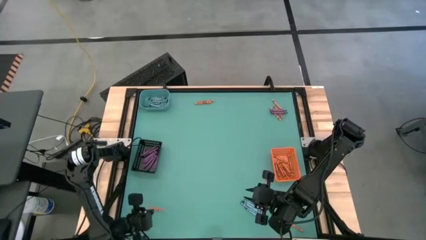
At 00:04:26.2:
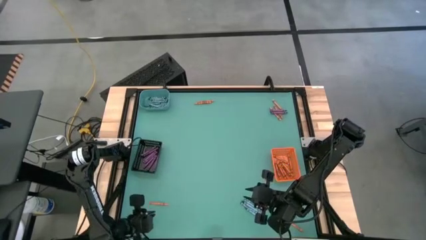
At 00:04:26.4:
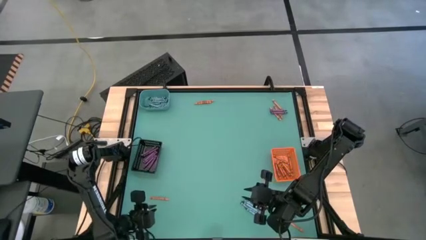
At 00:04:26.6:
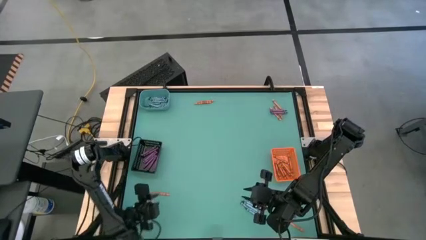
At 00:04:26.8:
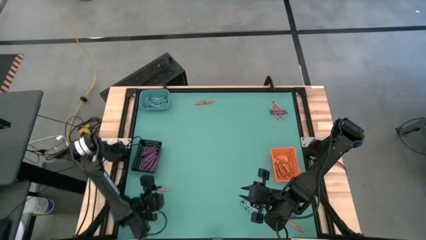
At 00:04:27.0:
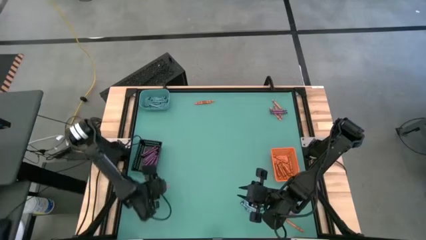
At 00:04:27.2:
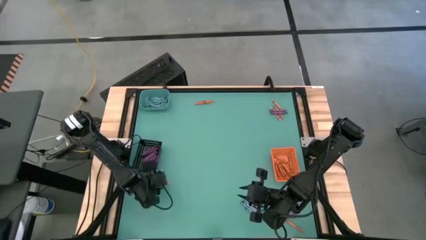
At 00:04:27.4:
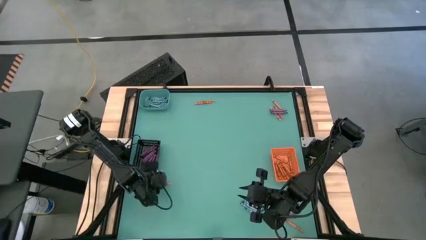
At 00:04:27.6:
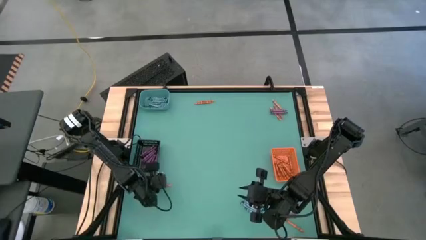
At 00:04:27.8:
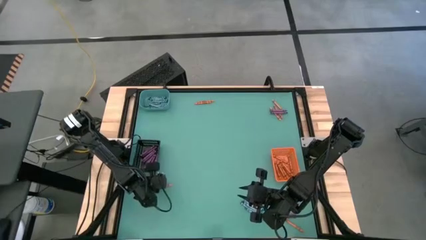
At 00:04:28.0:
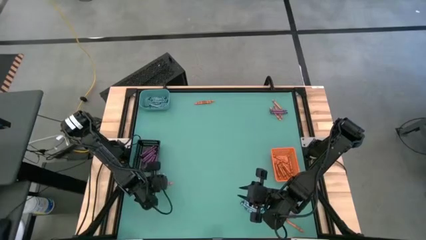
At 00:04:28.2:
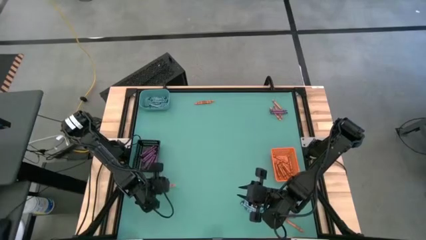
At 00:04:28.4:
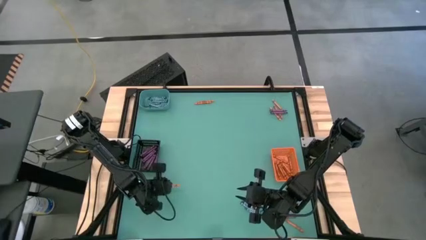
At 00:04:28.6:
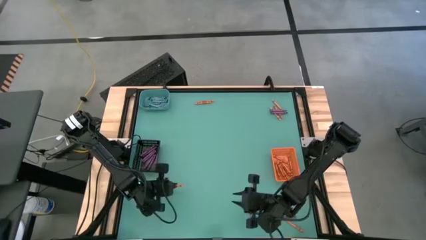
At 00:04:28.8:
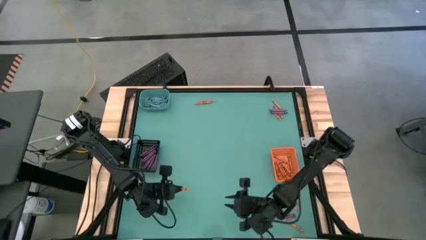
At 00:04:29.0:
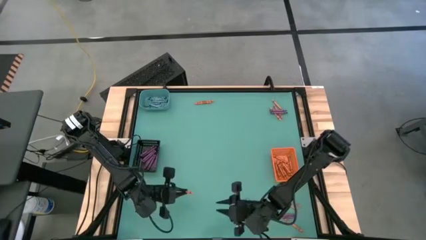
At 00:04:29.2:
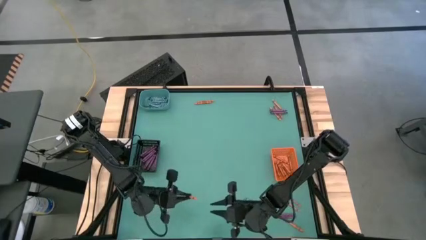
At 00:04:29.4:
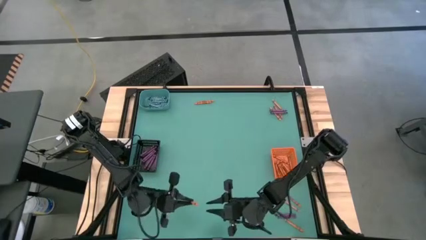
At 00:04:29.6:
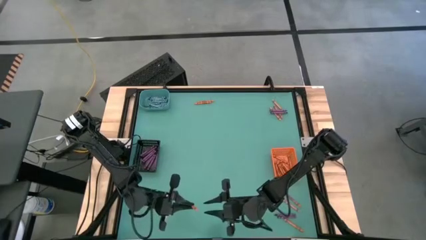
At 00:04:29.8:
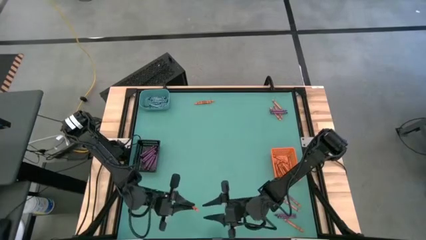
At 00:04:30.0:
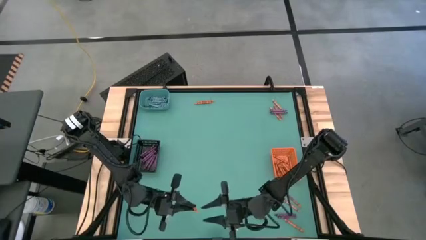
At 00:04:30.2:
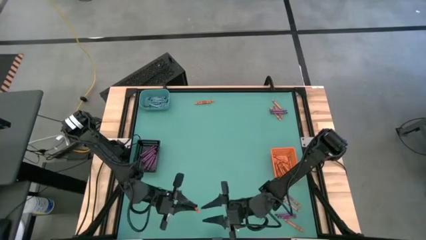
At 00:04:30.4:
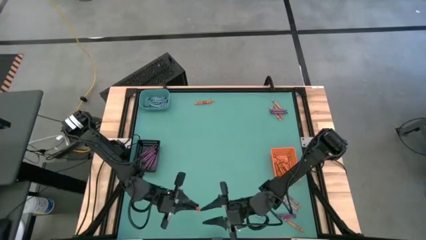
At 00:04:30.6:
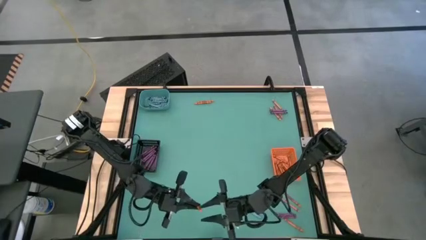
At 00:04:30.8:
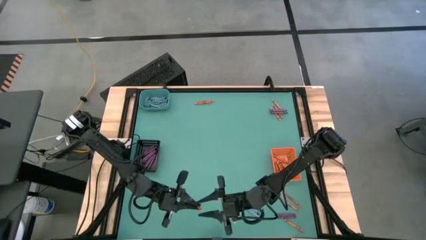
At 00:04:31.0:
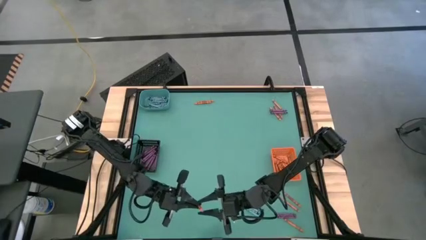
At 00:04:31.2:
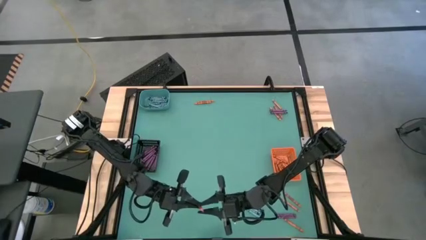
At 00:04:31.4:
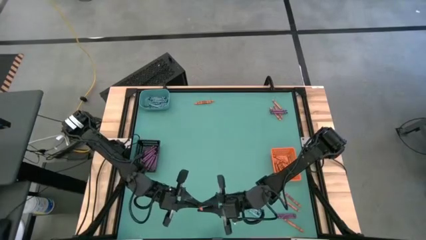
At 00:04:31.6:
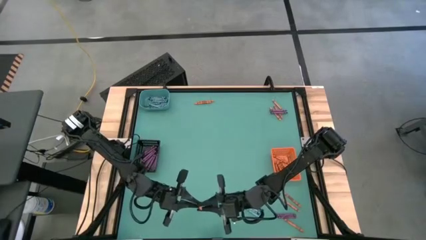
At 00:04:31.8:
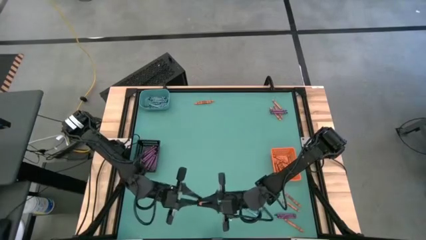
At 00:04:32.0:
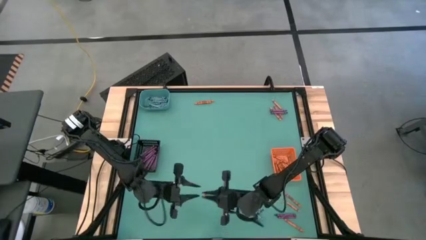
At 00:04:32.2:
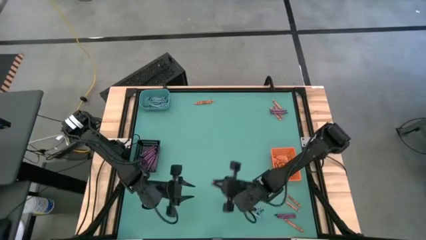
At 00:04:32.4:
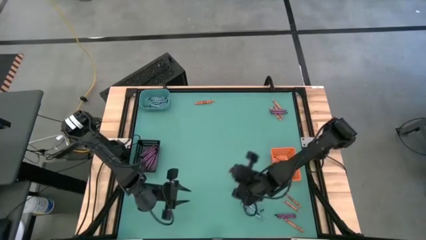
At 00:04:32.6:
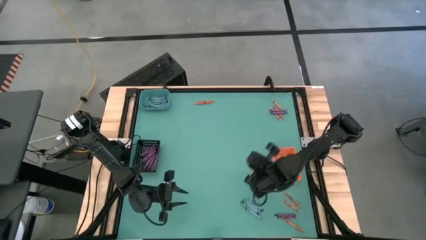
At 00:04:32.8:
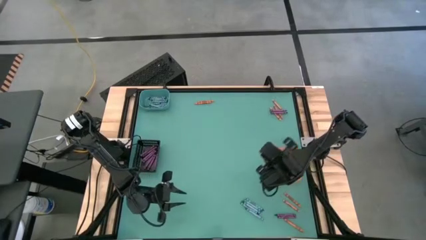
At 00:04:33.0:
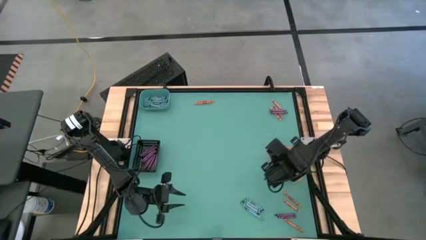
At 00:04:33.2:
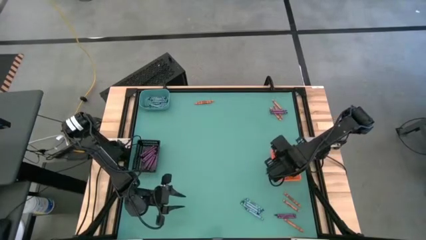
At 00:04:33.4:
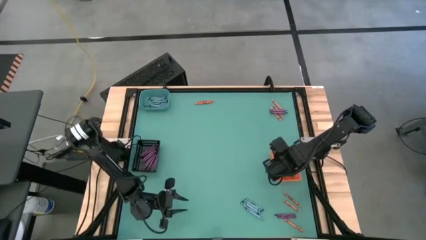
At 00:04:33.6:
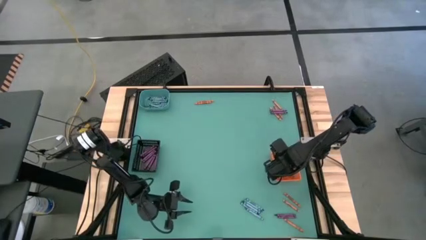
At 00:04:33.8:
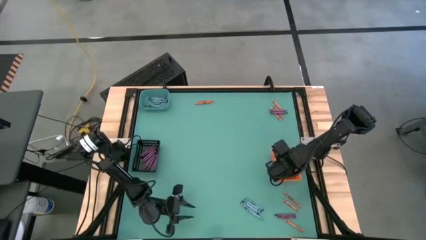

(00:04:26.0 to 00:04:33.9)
Task: Sort crayons
Put the orange crayon into the orange bin

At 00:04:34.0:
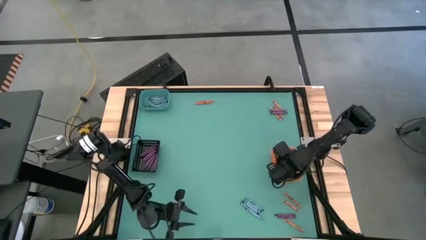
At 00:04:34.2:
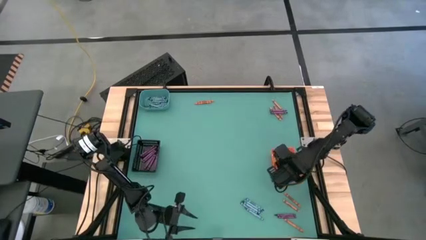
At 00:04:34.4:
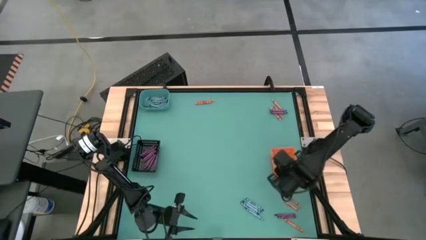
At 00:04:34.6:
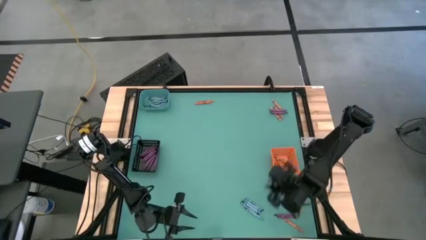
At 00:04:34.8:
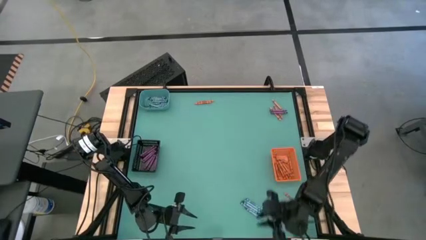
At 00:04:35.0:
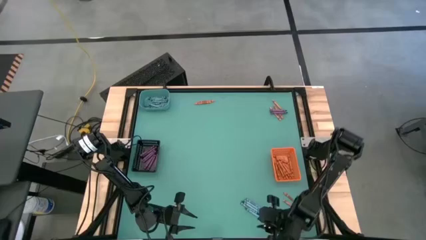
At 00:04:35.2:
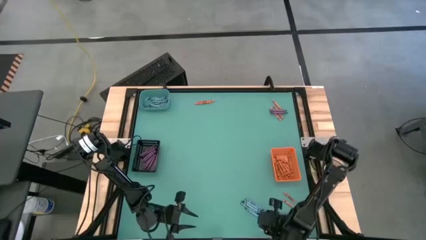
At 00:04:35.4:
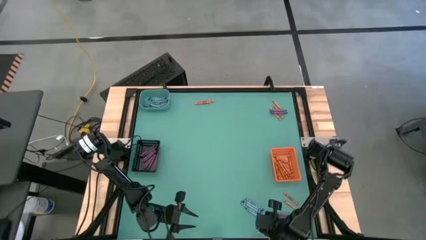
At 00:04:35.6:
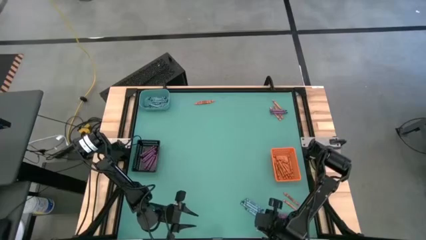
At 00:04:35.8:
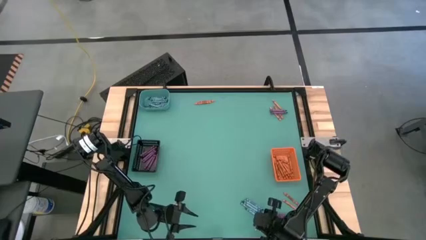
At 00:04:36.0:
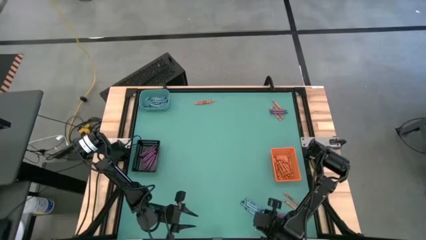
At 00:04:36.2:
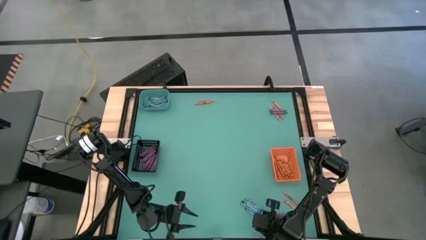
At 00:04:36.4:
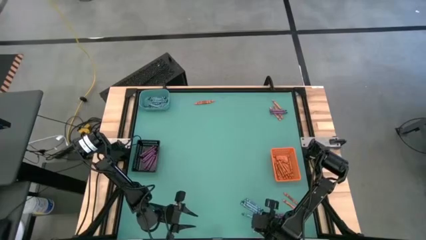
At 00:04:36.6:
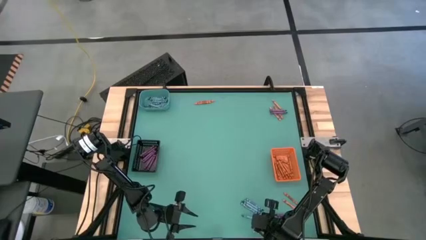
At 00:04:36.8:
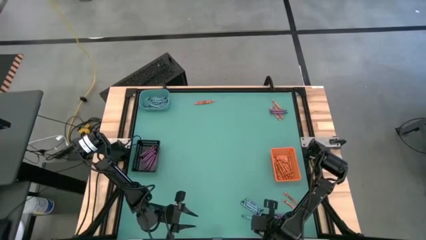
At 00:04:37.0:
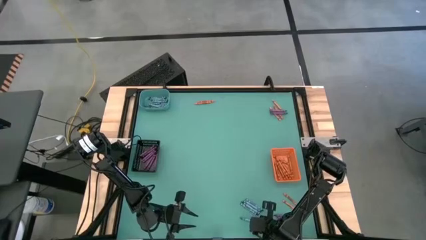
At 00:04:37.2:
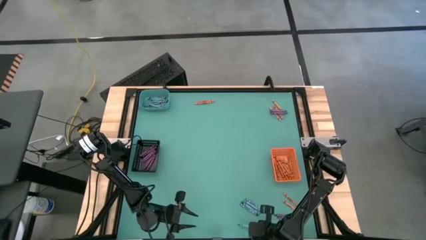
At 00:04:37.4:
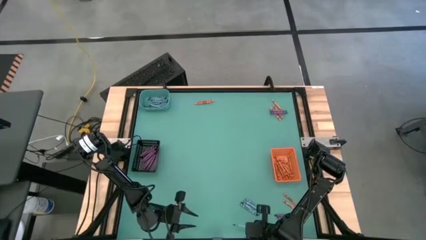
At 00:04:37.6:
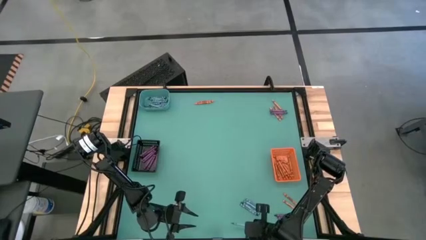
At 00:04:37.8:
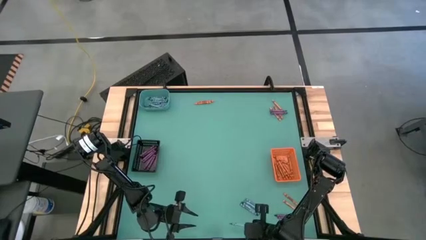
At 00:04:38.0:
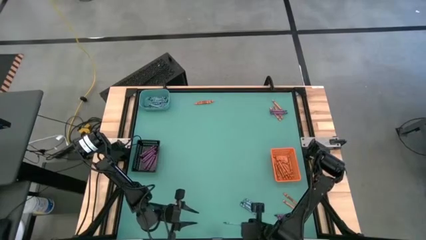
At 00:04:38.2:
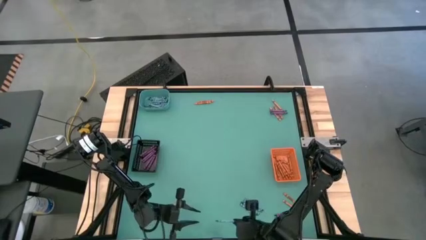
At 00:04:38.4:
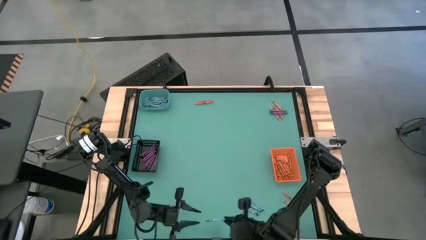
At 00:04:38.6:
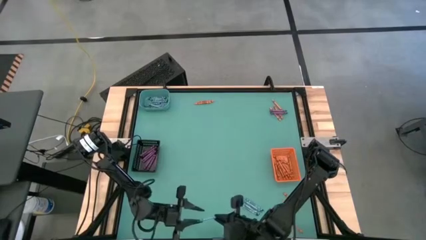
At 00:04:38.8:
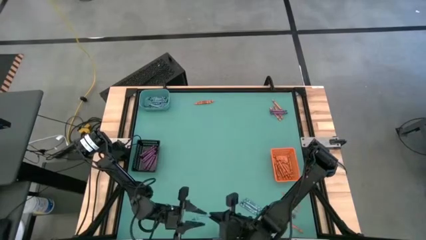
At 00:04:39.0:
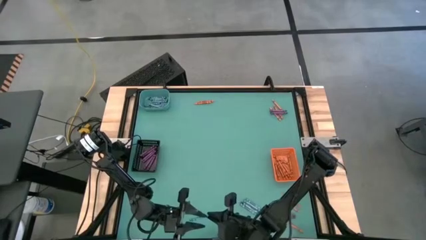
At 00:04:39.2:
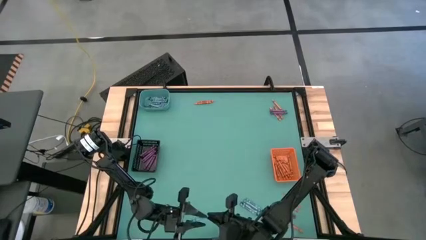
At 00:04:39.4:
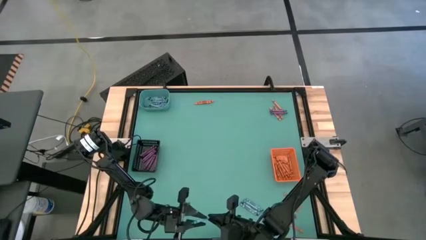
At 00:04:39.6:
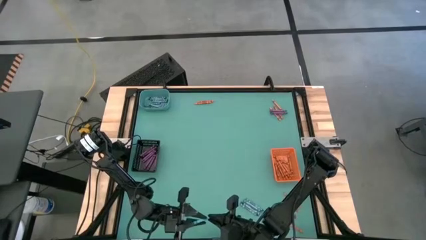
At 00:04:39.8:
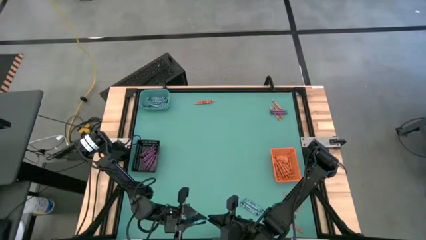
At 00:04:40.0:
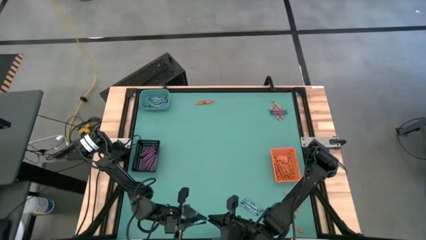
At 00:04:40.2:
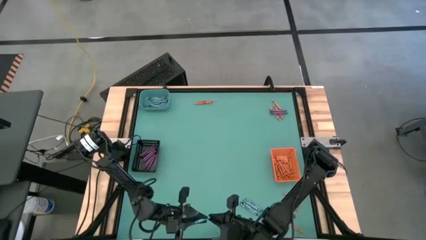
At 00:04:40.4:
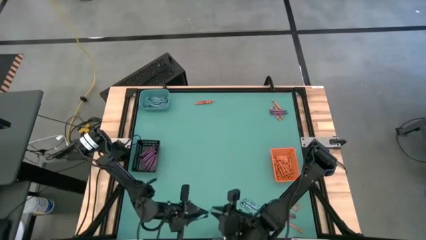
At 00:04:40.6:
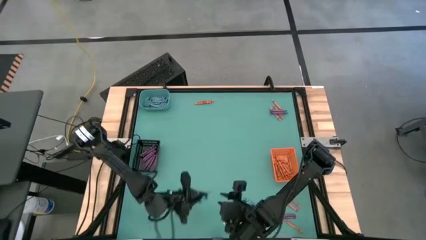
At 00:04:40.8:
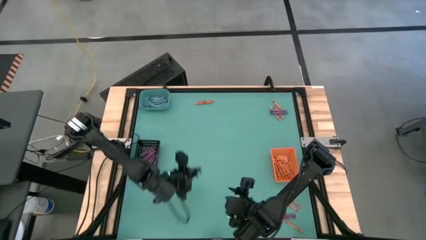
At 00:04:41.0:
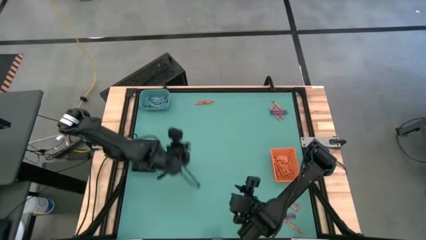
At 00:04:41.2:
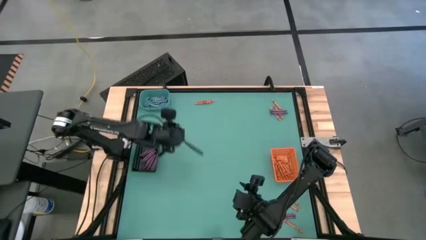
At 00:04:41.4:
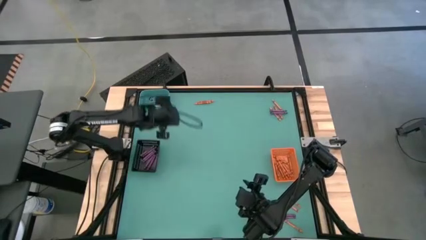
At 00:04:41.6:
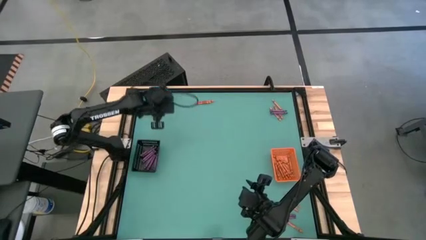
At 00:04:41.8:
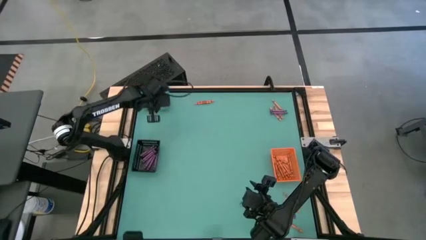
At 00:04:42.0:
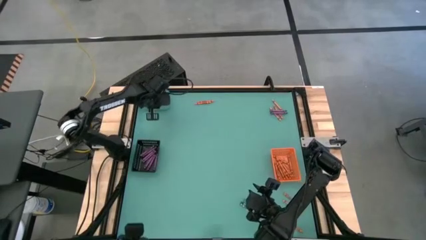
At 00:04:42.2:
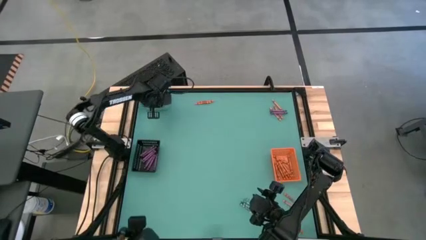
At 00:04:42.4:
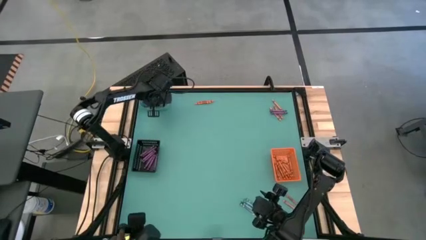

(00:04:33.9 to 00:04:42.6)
Put the green crayon into the green bin
